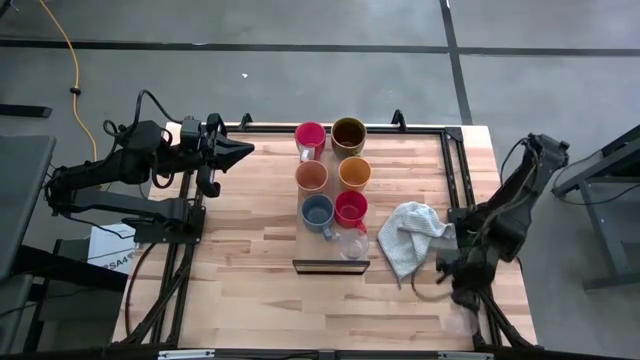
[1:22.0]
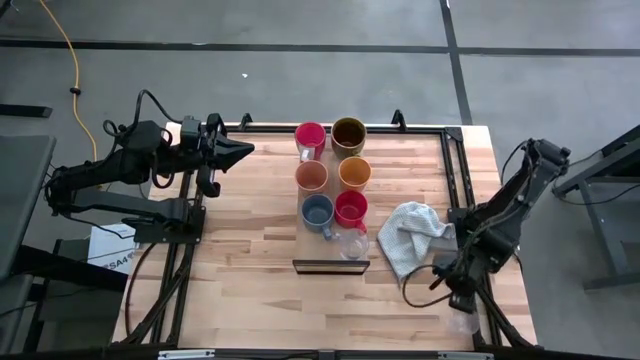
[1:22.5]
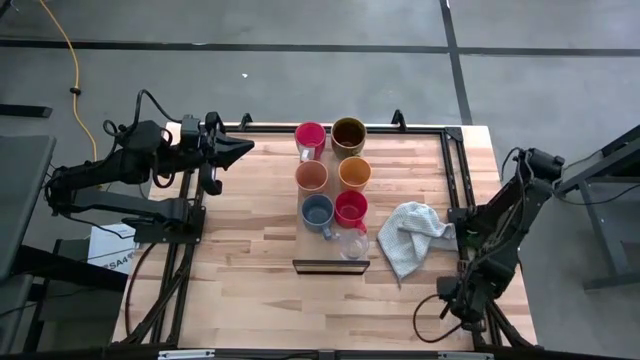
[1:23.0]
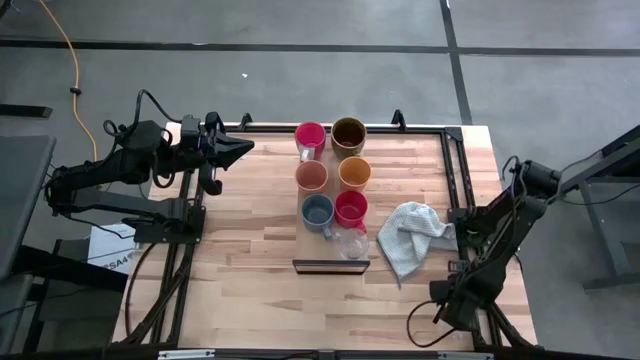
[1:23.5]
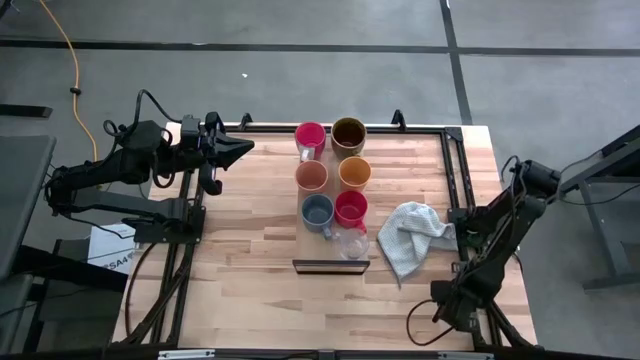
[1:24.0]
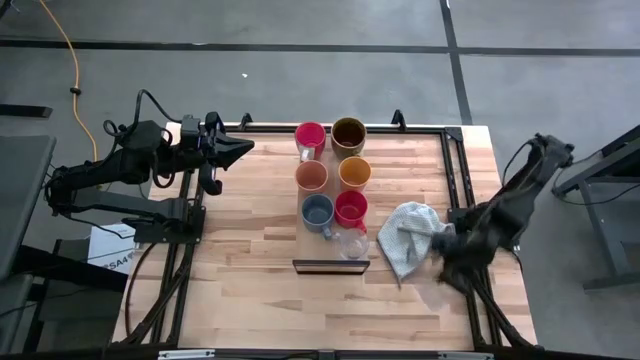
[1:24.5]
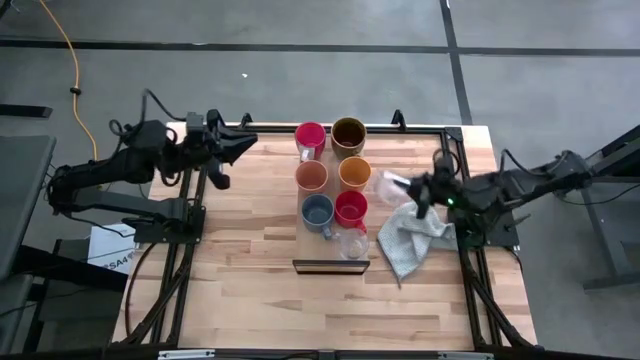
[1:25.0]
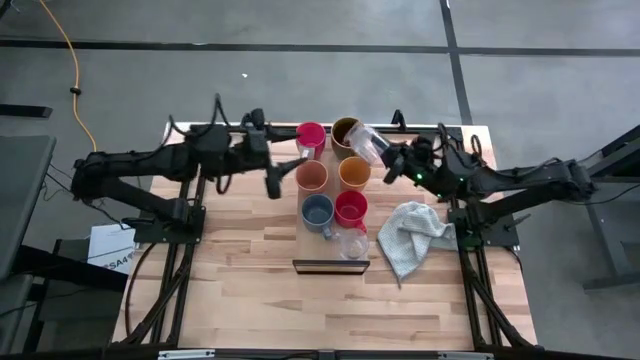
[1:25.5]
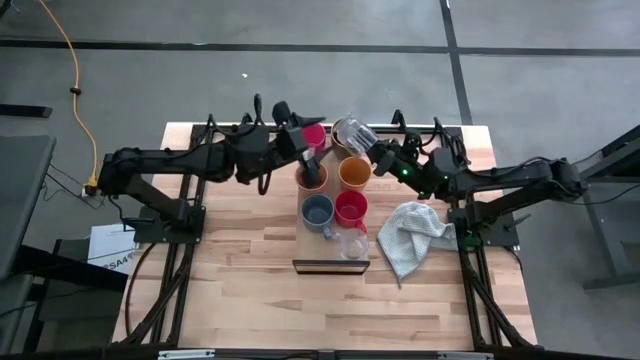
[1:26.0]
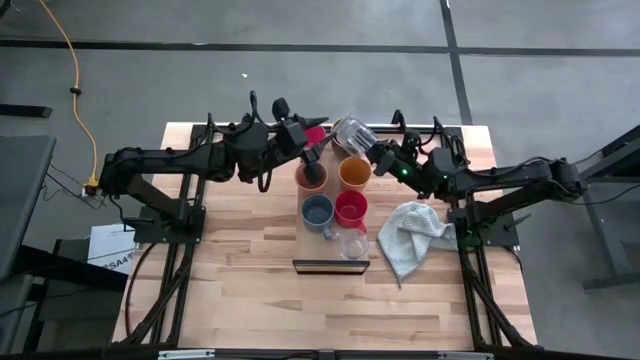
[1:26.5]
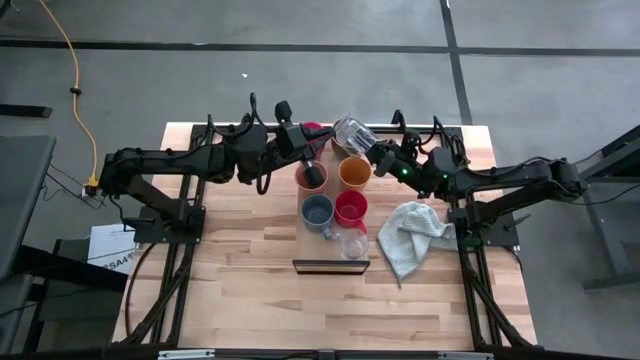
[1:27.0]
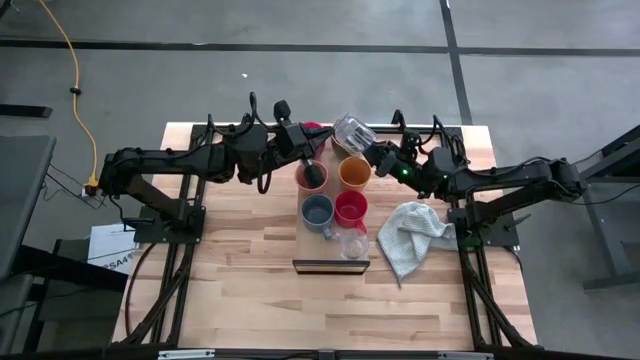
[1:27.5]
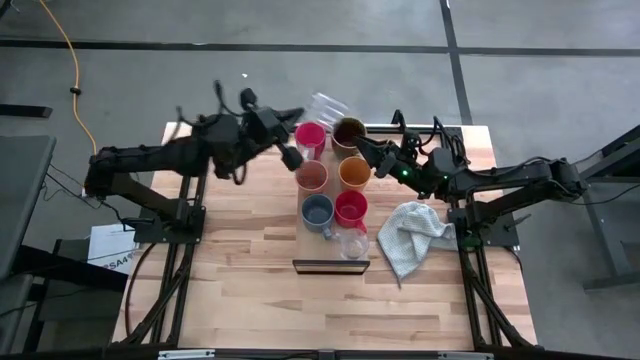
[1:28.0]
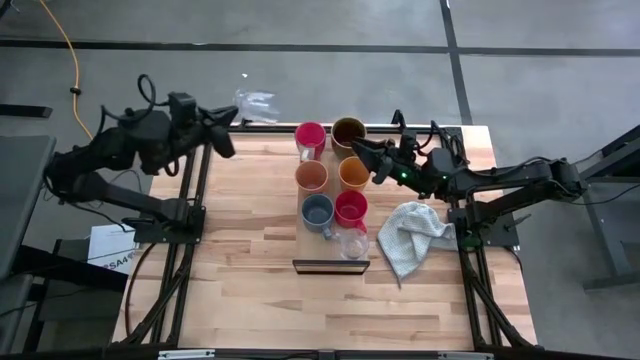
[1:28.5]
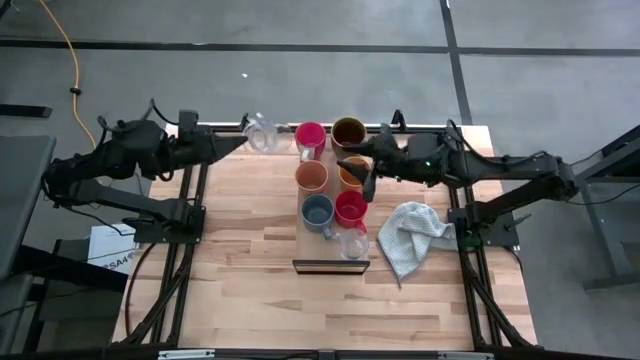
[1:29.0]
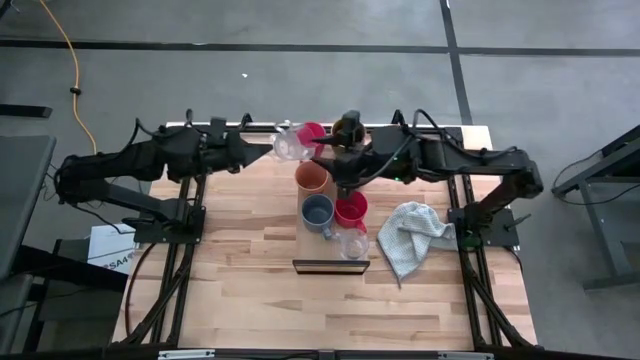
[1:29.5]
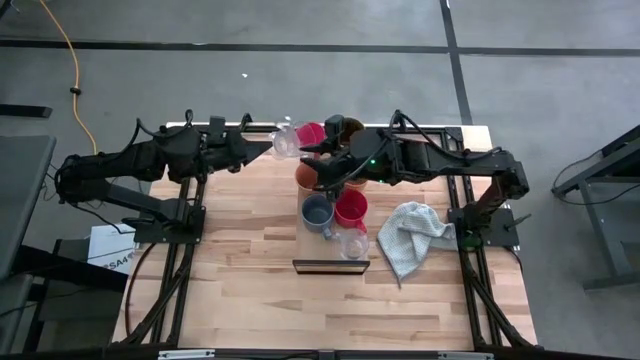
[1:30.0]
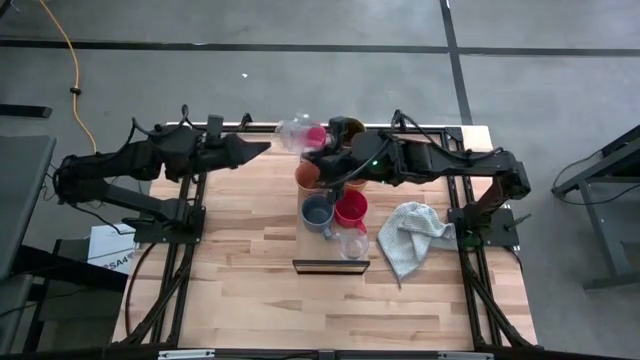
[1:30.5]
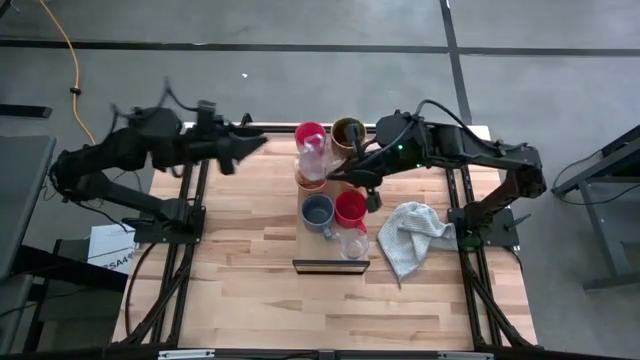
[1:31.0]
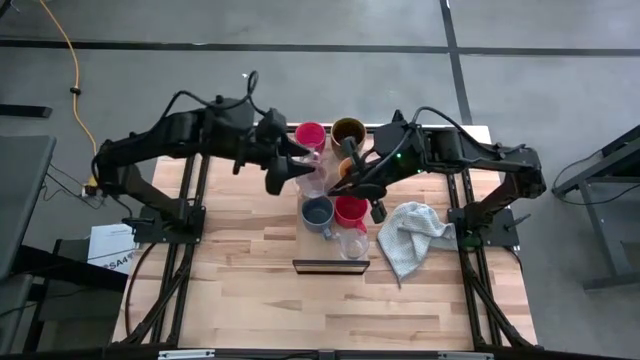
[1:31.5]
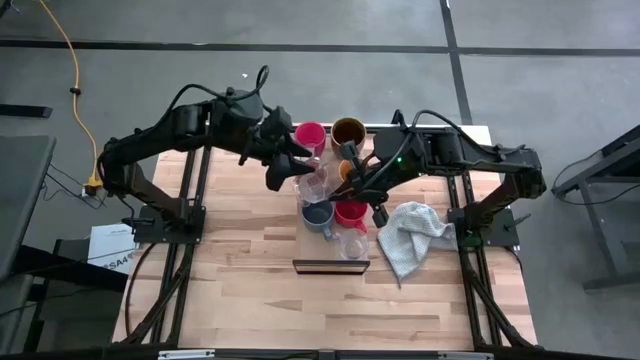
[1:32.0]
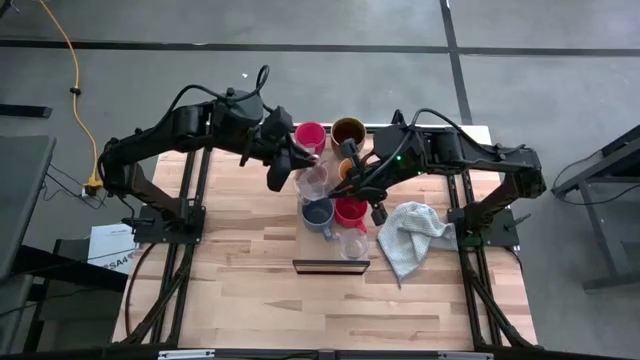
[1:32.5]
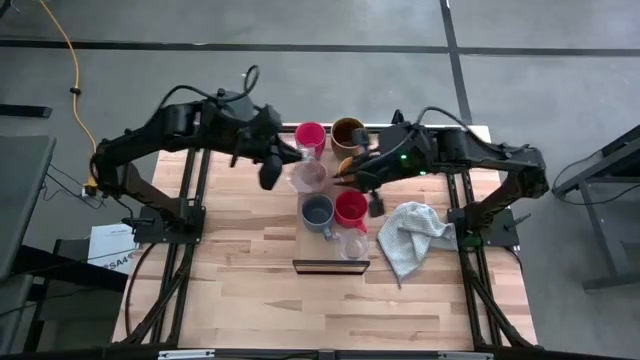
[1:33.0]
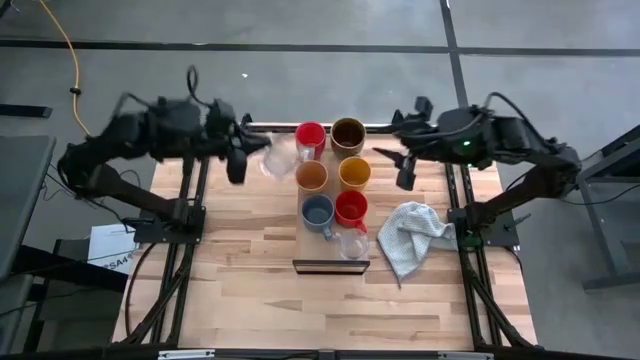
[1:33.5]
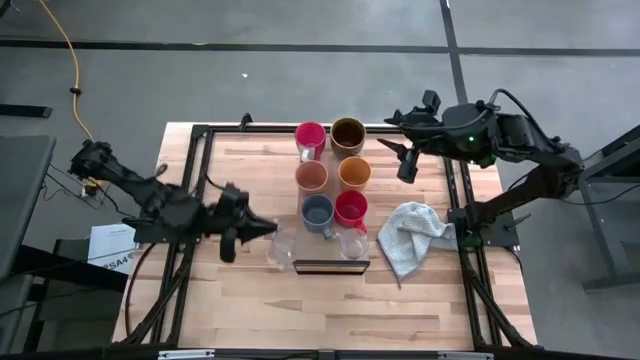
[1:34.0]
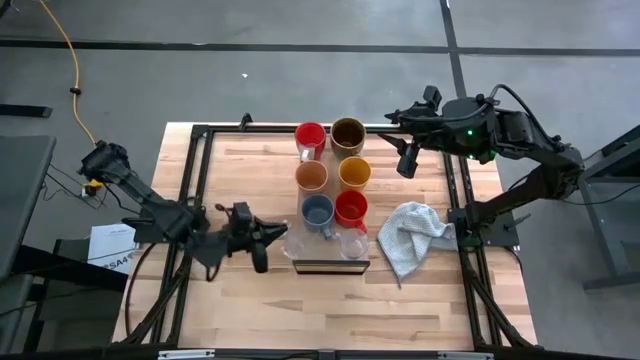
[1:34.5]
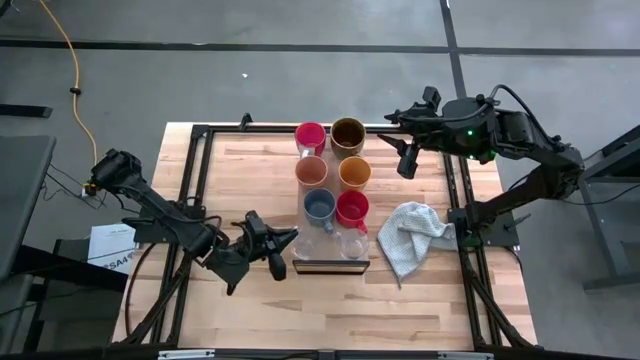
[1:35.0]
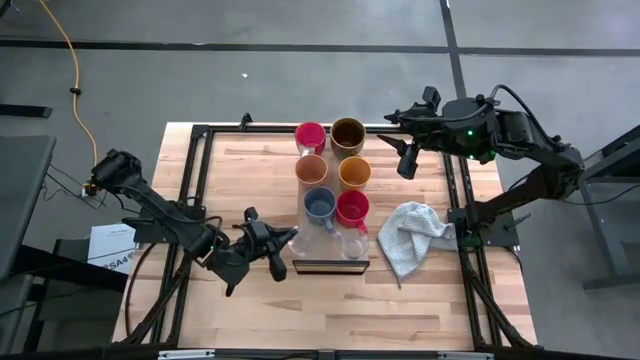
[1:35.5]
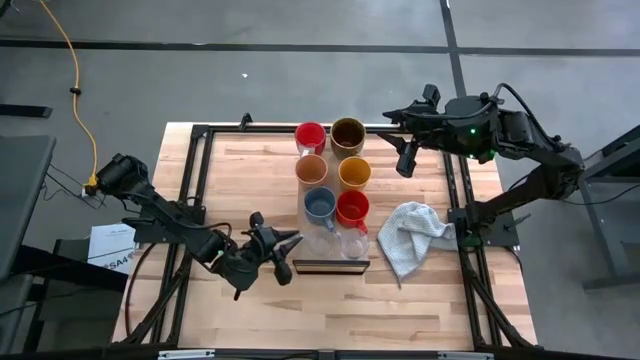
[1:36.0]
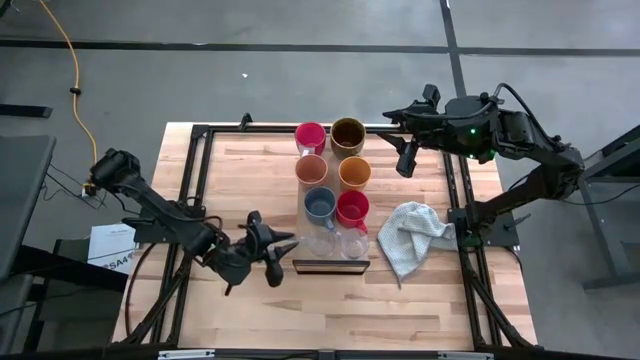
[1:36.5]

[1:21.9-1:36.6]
Task: Stack small to large cups/mugs on shelf
Put the transparent mug on the shelf

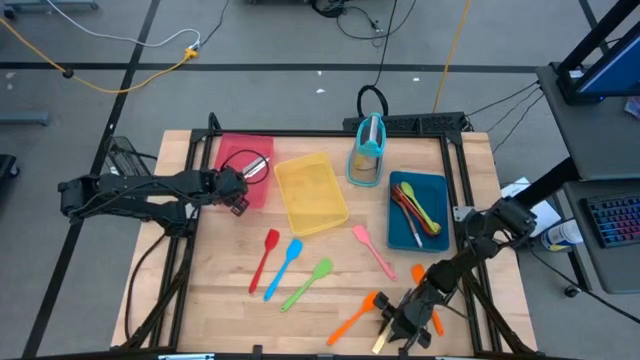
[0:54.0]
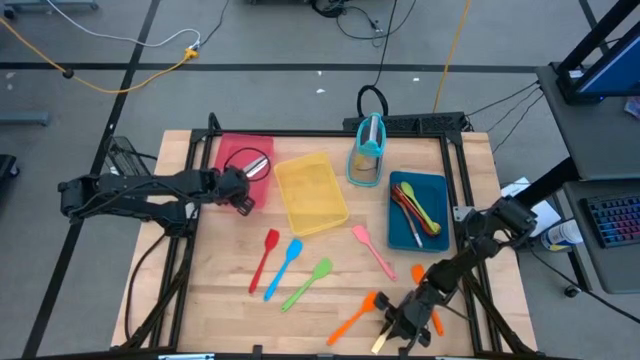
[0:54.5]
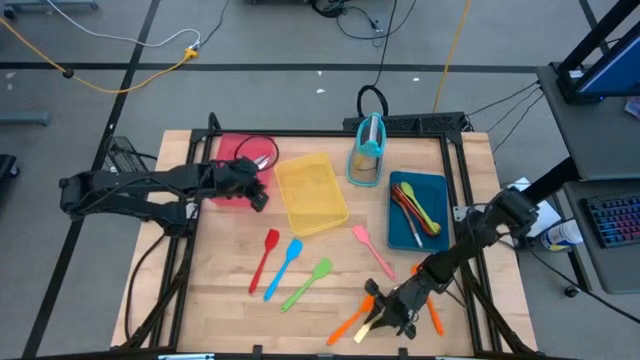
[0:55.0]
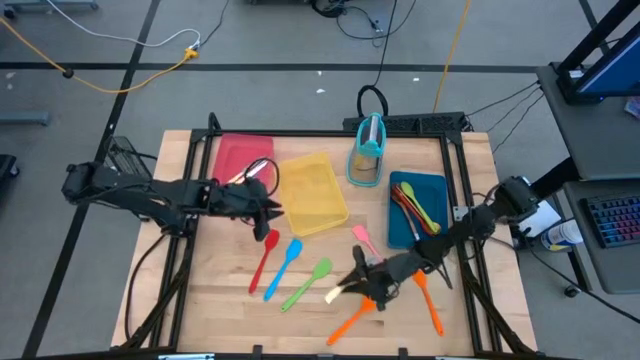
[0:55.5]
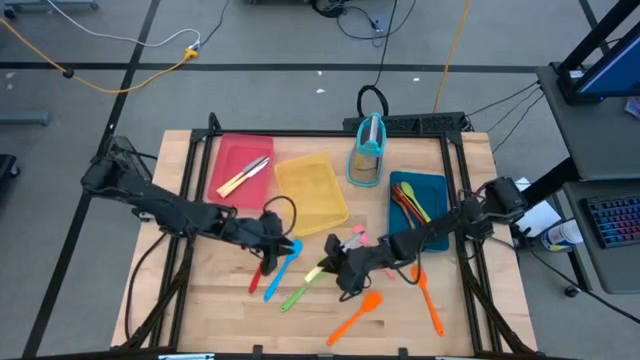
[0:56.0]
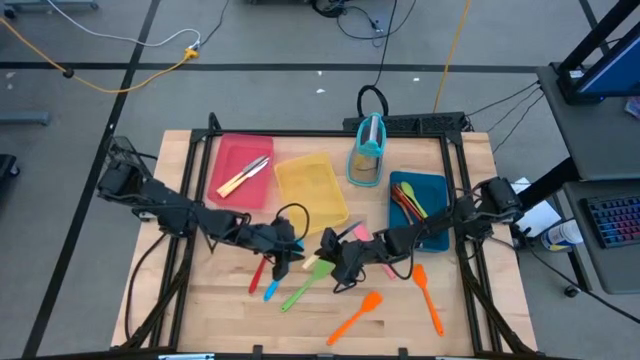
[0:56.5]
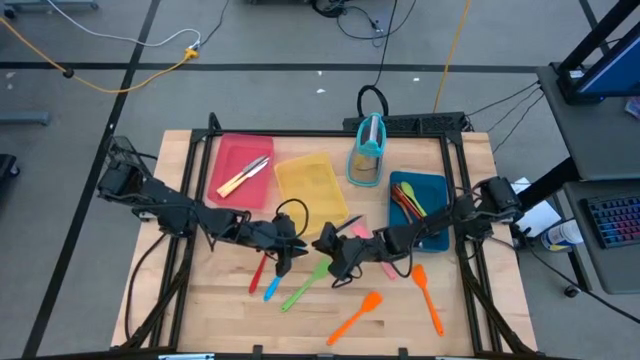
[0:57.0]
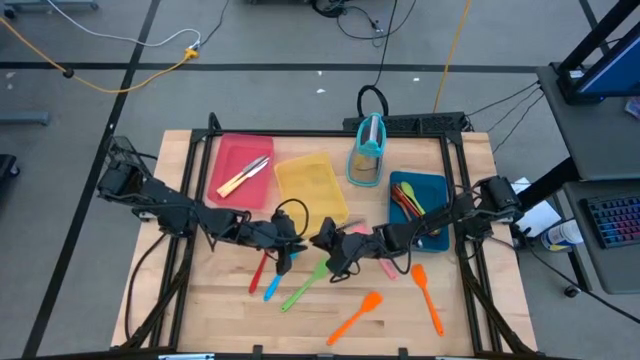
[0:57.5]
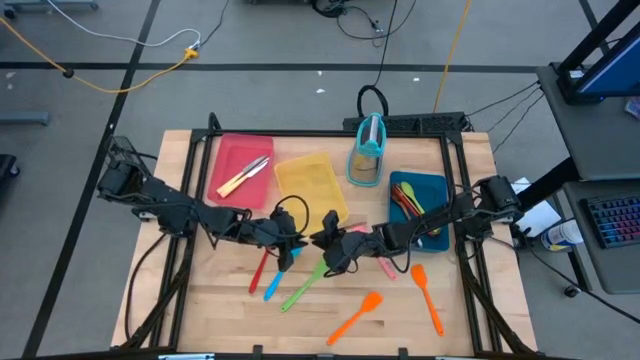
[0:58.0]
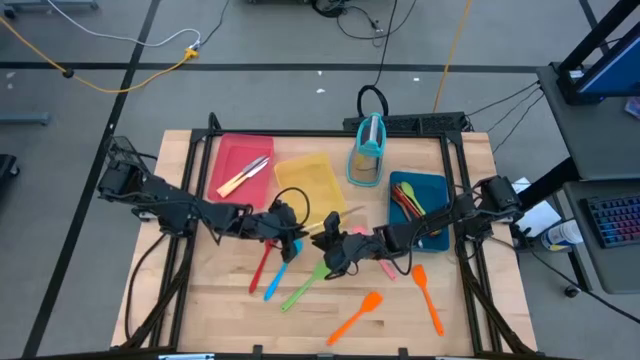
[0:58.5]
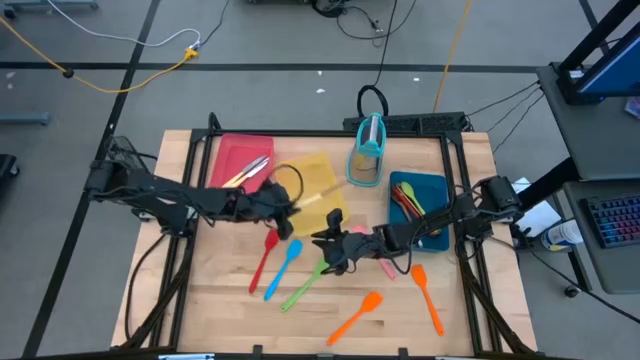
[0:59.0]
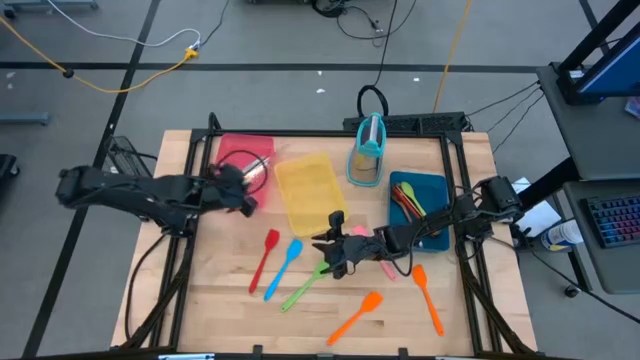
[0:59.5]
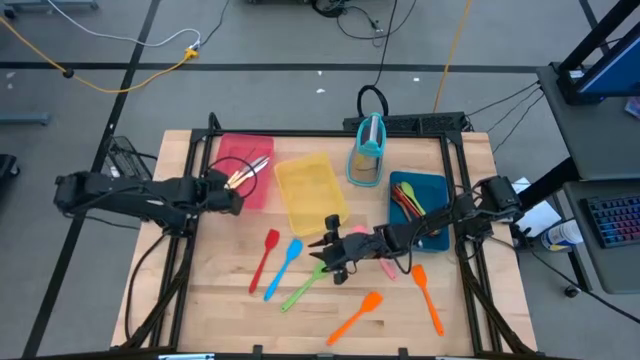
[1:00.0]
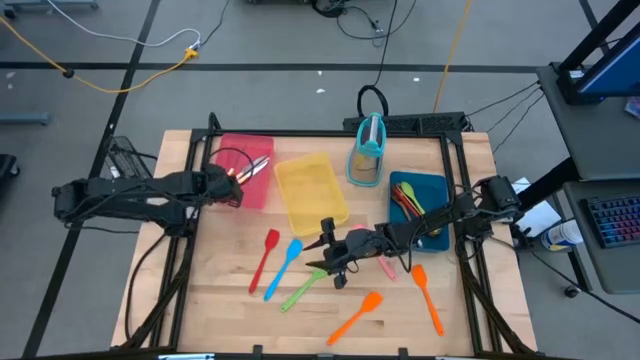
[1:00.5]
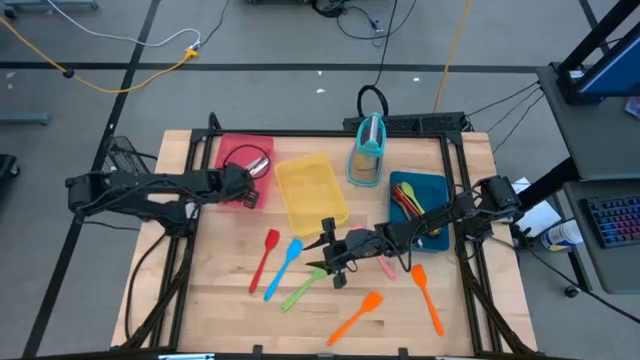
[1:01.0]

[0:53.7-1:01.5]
Task: Pick & Place Kitchen Items
Put the yellow knife into the red bin
